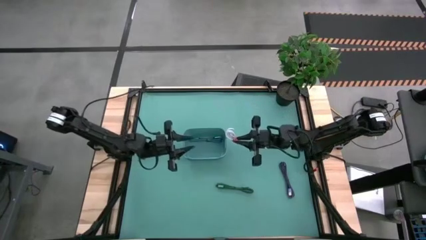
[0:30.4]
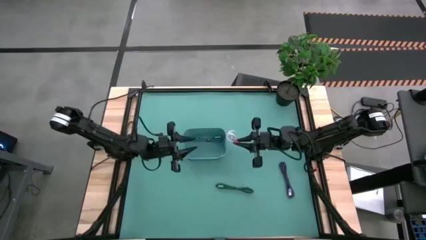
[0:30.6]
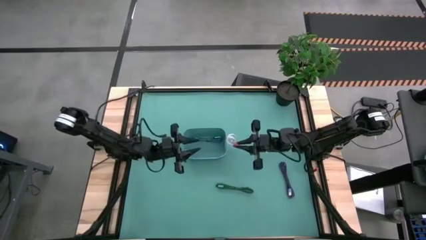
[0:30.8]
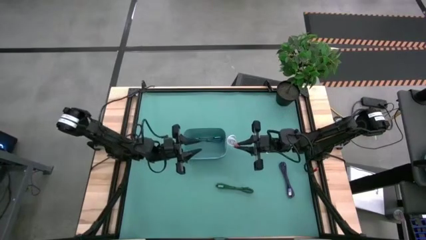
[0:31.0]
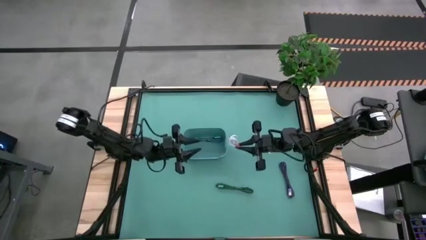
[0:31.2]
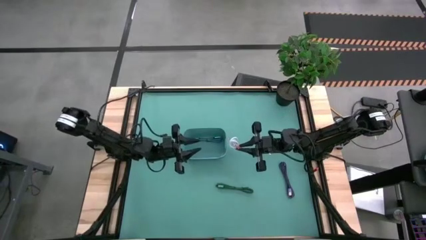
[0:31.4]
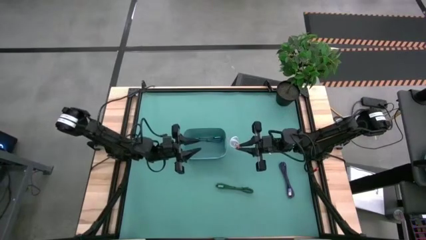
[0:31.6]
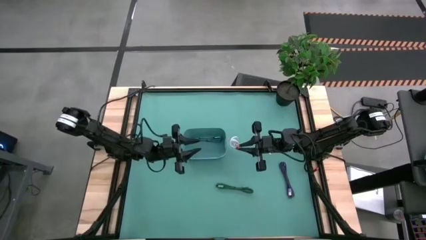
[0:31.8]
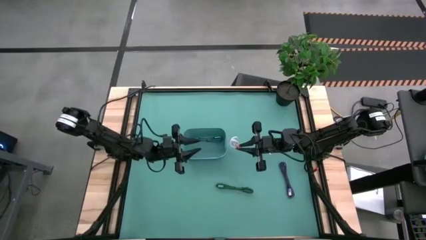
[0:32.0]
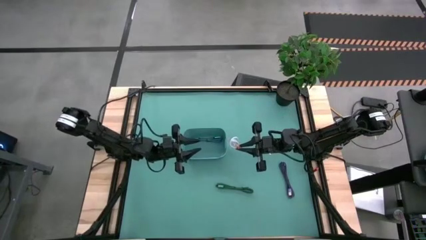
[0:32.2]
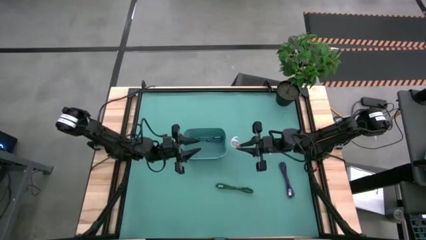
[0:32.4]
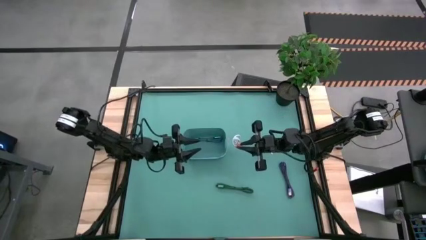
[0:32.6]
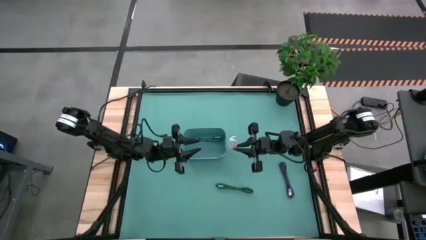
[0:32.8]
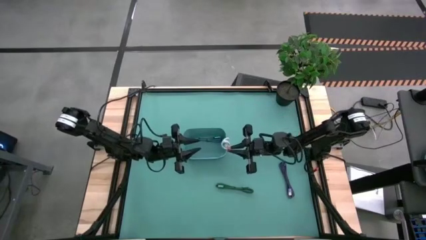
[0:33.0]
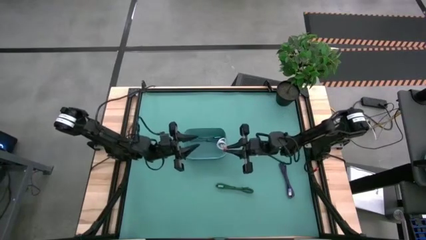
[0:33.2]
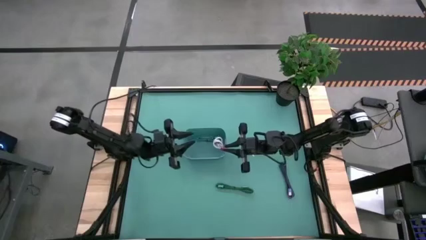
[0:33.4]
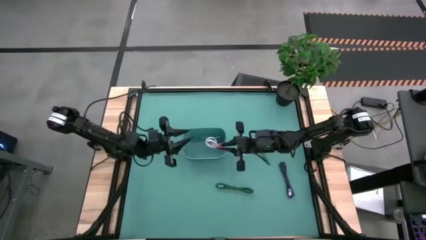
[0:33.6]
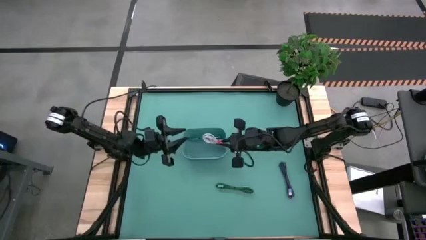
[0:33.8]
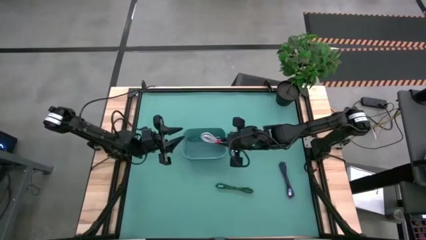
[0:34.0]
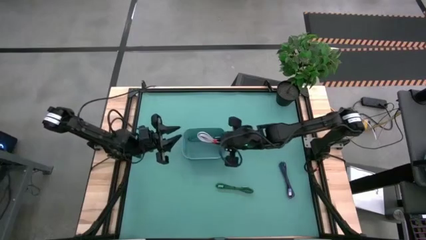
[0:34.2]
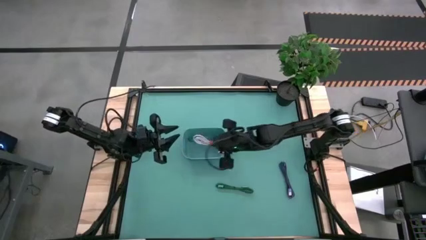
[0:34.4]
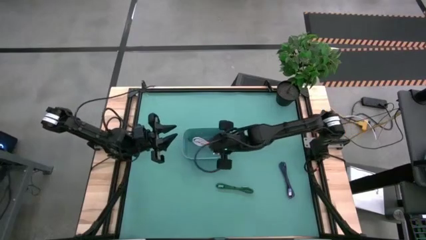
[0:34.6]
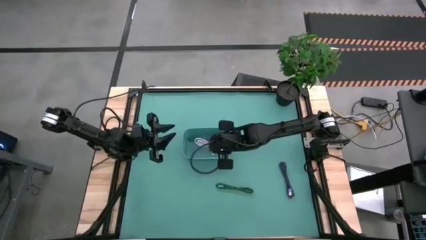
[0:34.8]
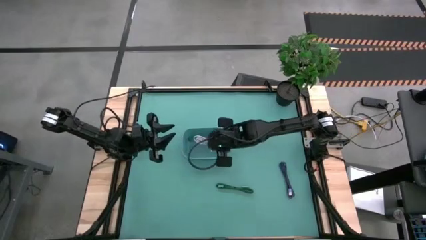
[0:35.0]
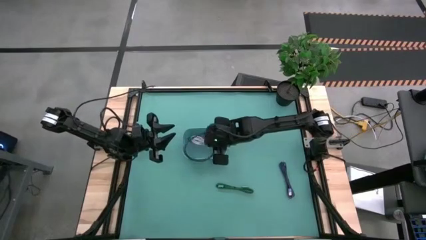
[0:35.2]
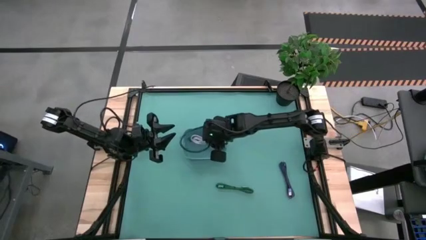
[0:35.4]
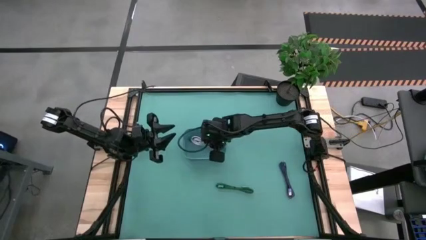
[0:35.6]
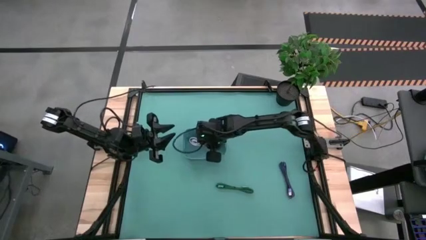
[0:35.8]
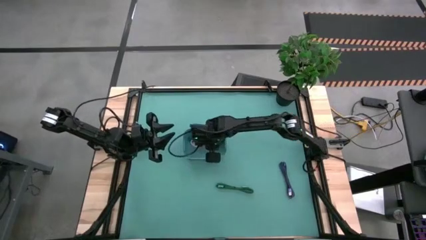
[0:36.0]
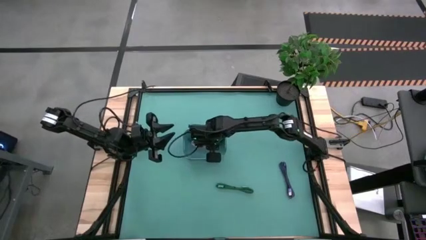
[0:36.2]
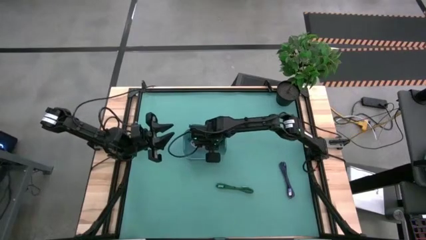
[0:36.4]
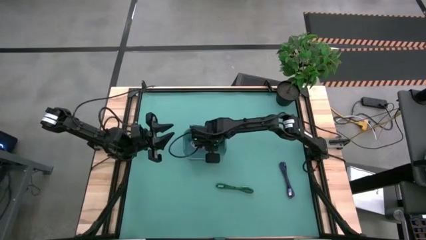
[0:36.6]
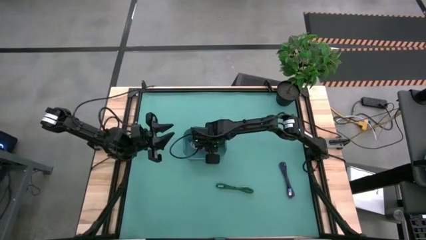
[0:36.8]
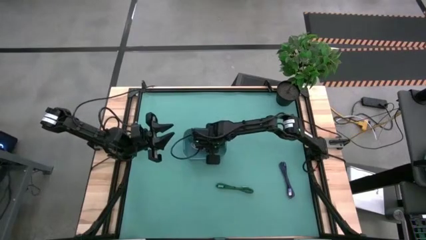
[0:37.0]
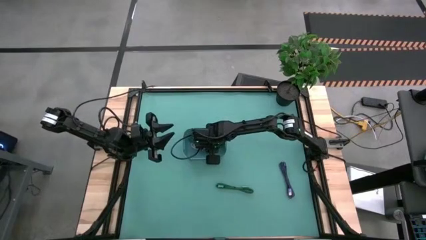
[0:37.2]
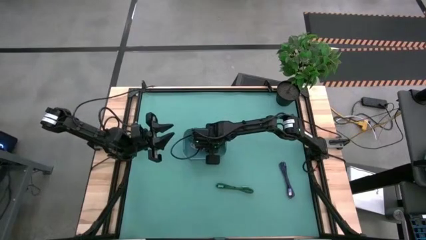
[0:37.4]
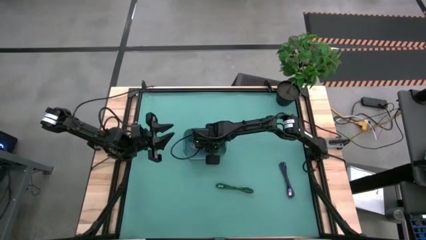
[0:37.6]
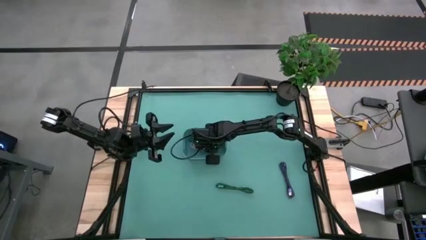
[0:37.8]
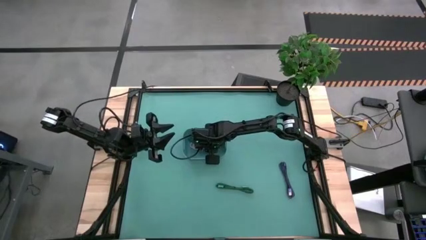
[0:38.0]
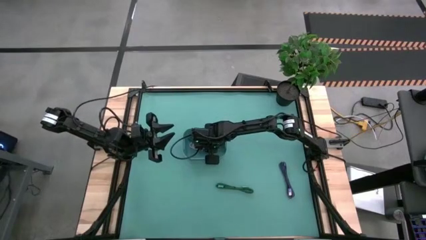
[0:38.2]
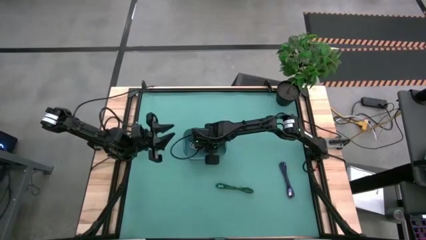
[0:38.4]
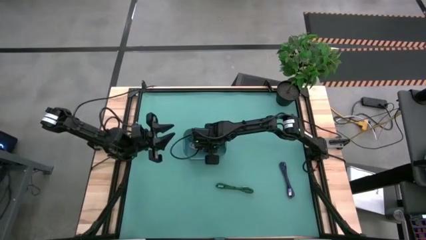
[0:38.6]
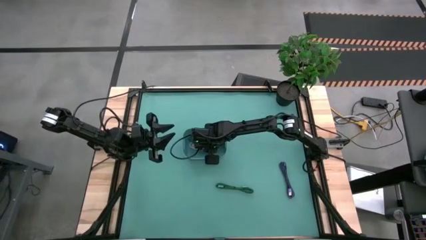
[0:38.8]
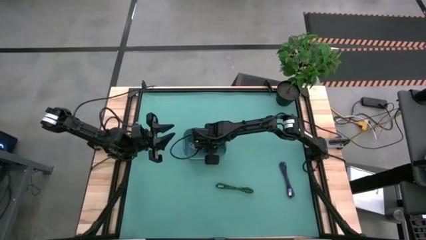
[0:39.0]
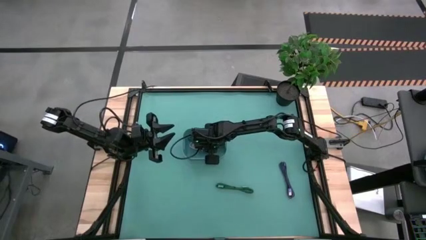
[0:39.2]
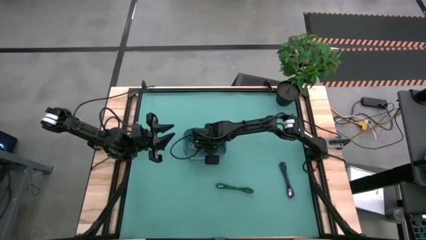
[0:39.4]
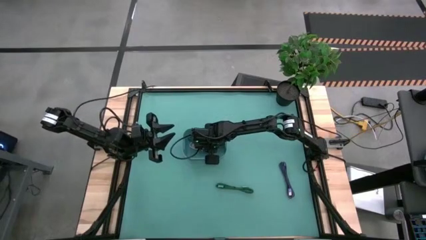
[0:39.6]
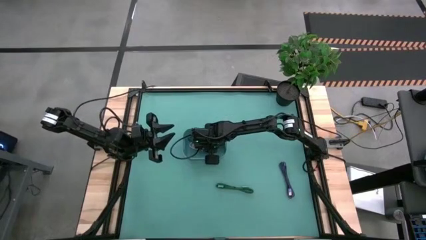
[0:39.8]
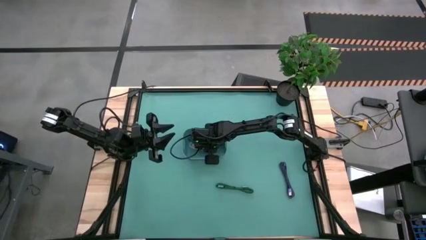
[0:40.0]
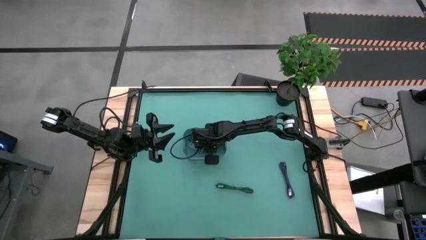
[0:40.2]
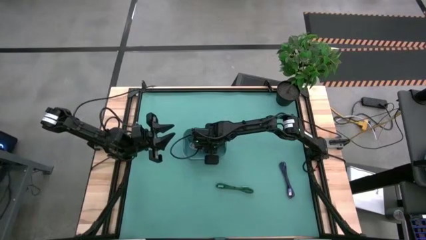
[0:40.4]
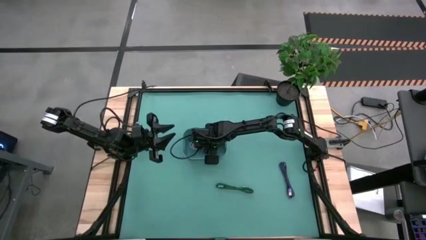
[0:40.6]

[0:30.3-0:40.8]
Task: Pick and place USB-C Cables
Put the white charger cable into the green bin

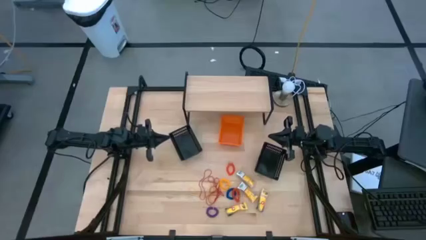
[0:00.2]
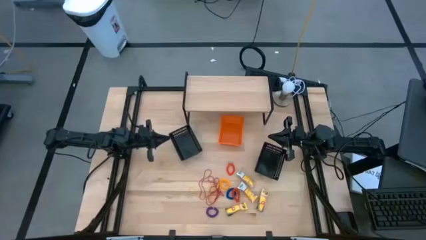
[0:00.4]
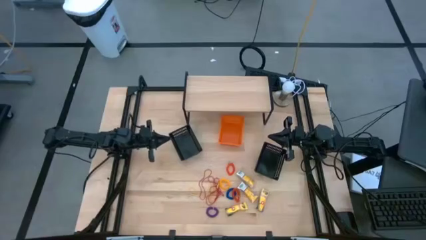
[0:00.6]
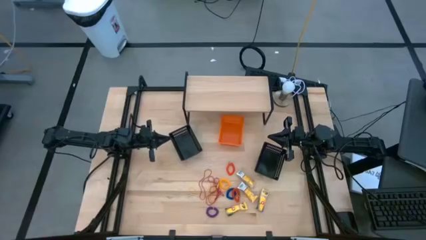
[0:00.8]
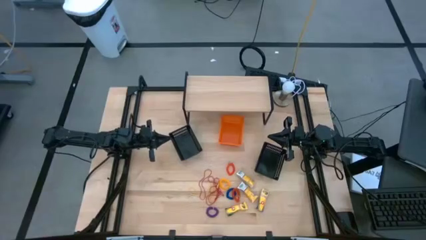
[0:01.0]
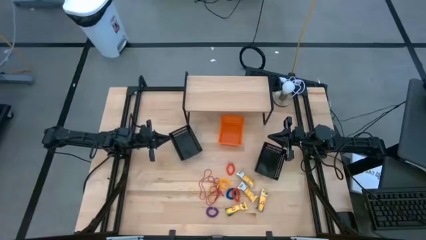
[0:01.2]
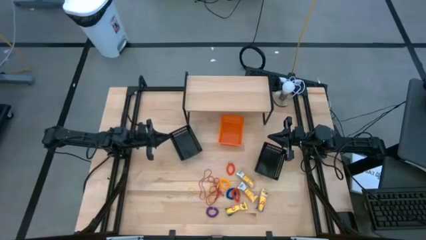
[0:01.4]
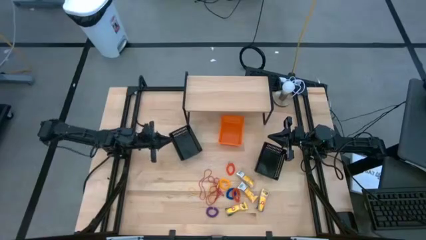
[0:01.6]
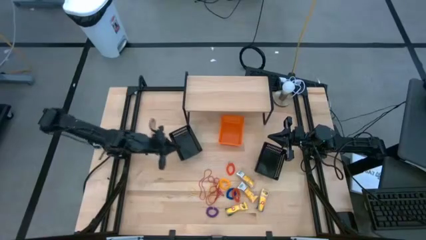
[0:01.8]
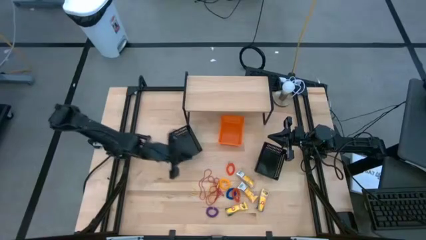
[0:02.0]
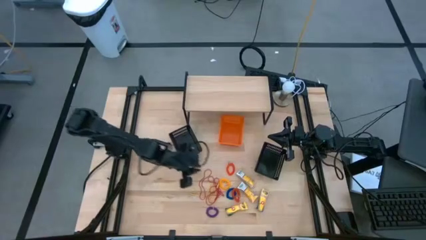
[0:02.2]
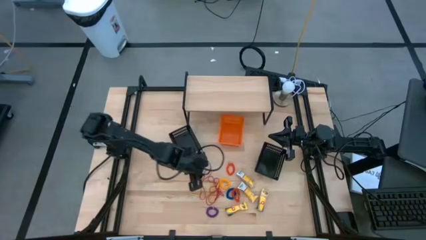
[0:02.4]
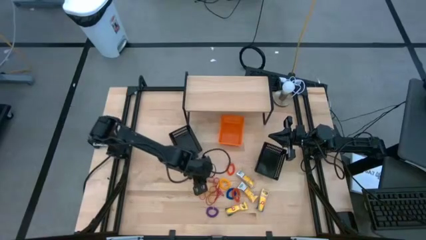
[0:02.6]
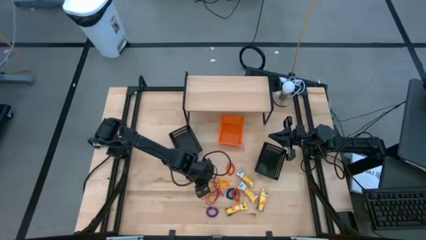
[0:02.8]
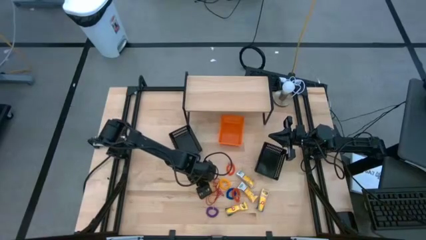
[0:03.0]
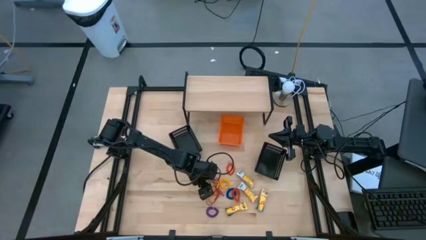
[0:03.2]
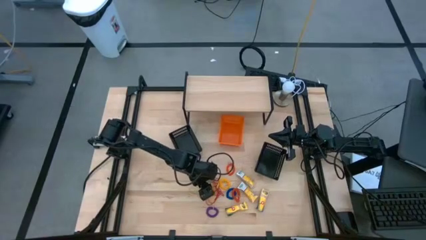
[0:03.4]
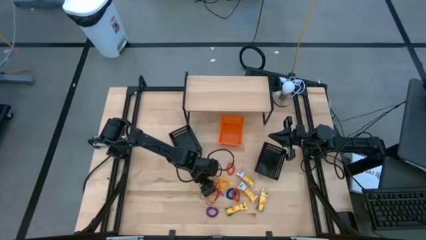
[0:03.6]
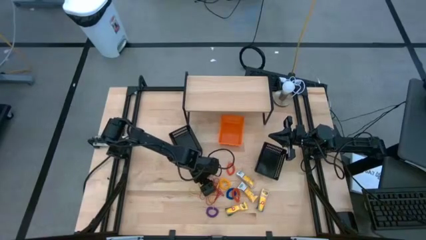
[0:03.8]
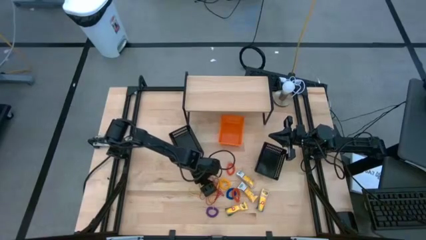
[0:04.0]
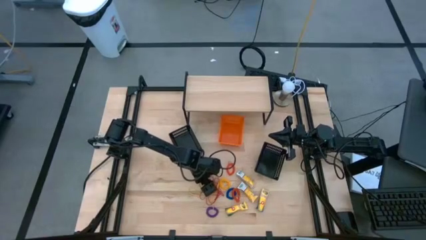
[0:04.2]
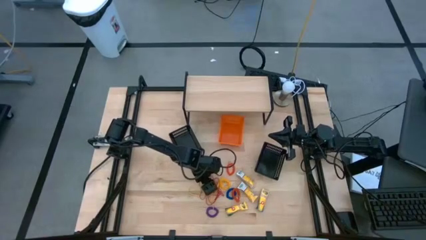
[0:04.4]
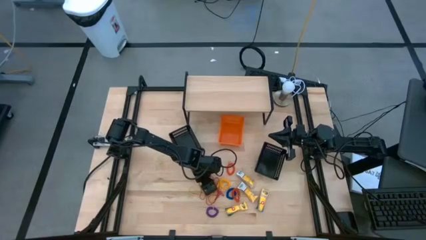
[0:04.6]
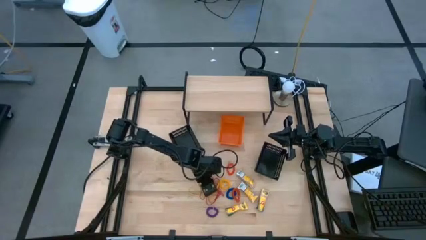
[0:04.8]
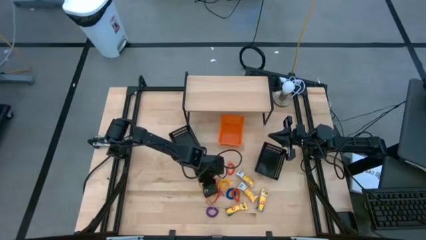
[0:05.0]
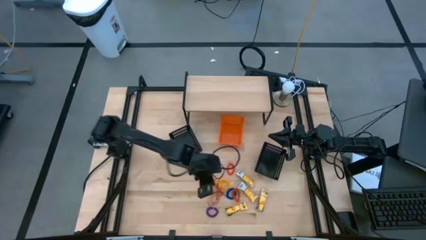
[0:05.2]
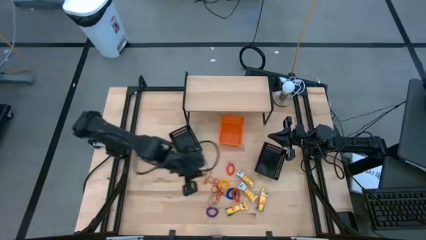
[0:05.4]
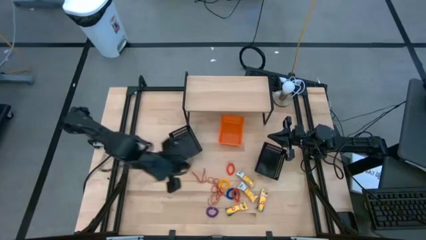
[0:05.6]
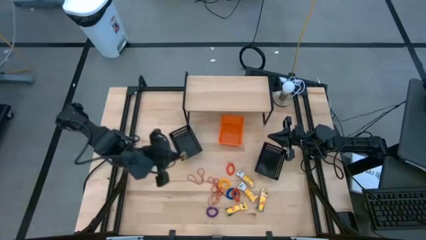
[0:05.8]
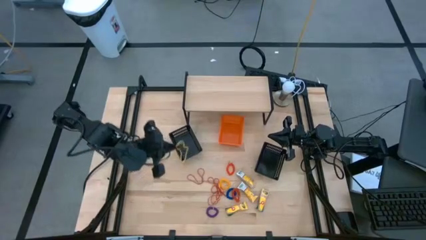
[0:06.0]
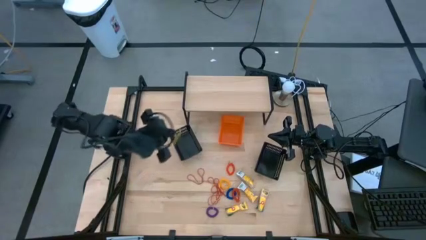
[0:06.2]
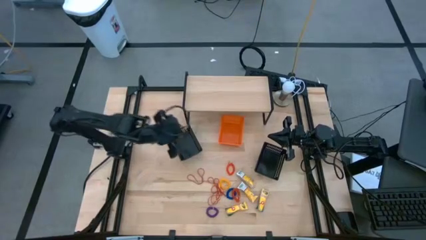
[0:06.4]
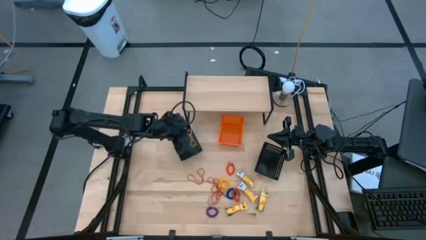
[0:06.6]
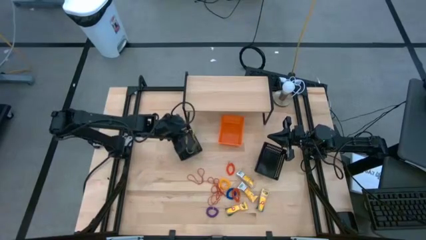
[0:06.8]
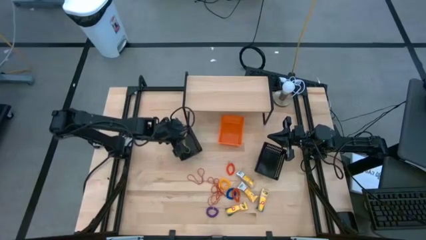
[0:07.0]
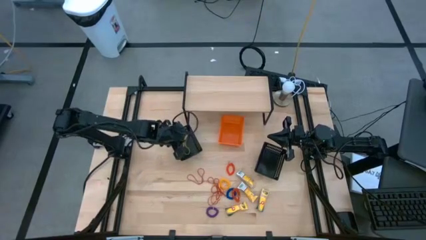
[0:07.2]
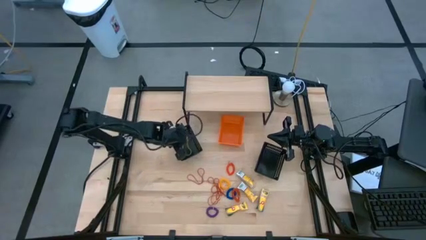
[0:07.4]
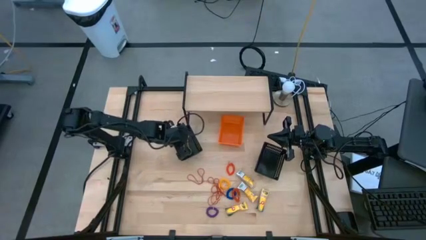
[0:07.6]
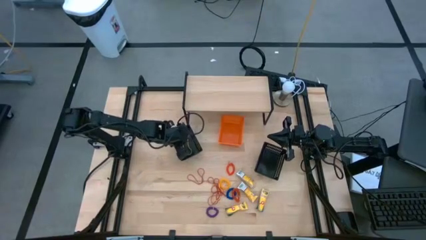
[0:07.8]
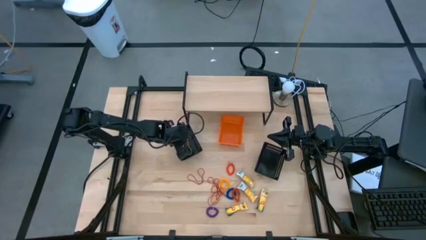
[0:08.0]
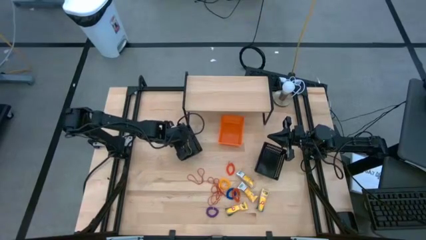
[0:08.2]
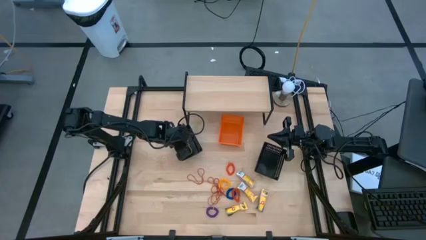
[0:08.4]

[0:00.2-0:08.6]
Task: Pick & Place Office Desk Supplies
Put the yellow rubberband into the left black bin
